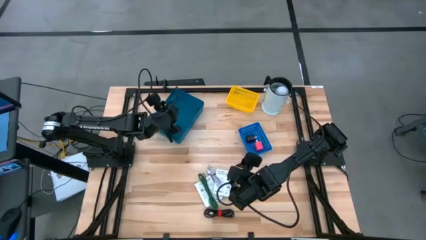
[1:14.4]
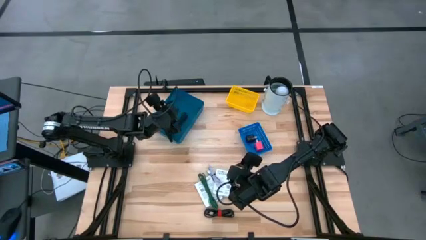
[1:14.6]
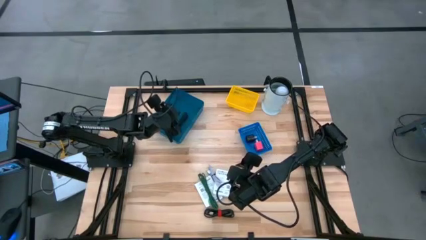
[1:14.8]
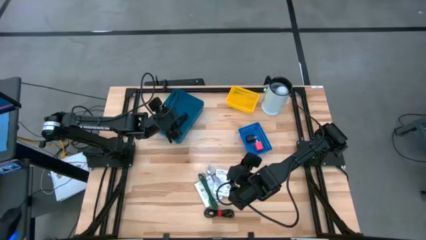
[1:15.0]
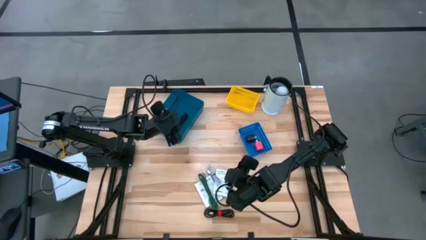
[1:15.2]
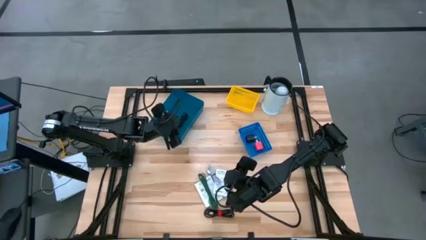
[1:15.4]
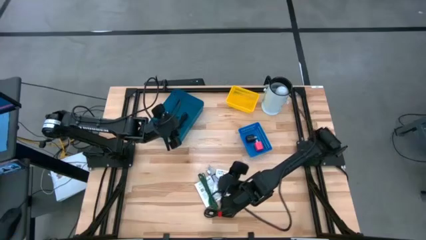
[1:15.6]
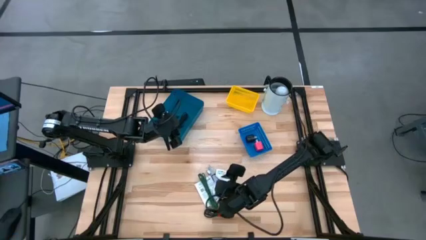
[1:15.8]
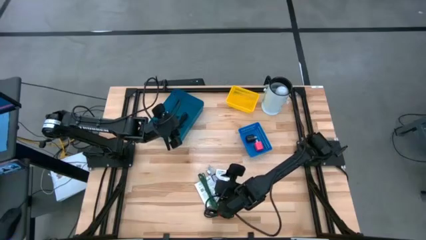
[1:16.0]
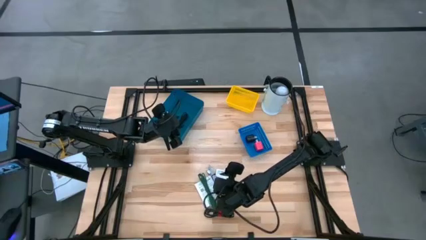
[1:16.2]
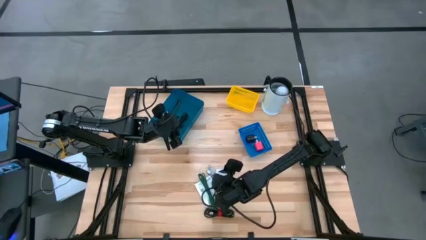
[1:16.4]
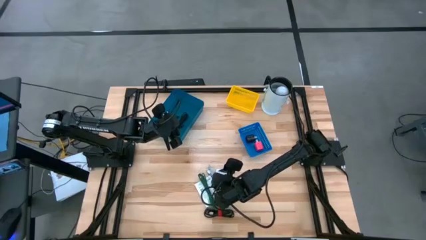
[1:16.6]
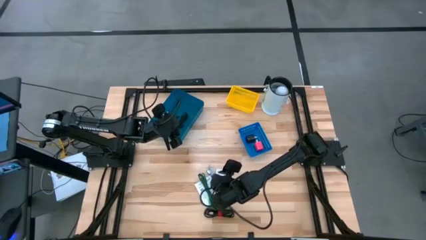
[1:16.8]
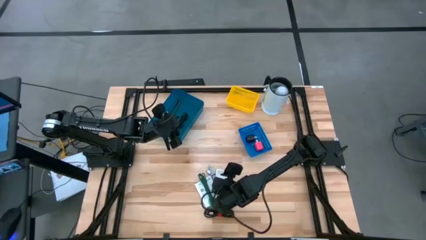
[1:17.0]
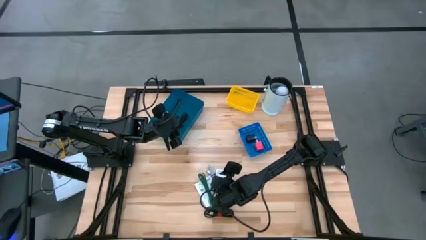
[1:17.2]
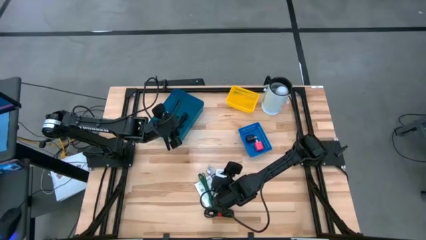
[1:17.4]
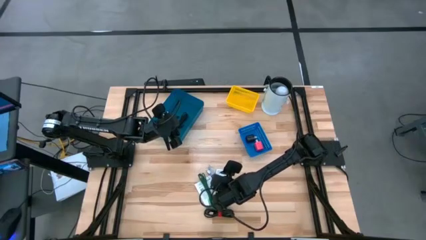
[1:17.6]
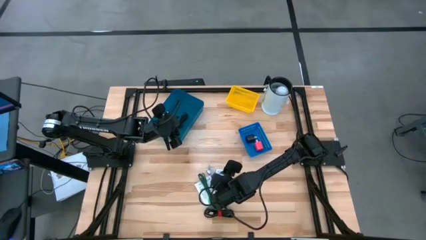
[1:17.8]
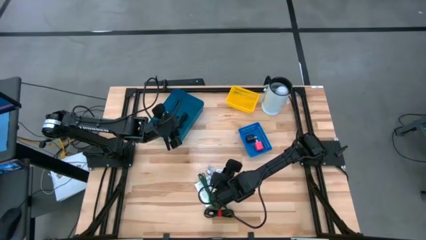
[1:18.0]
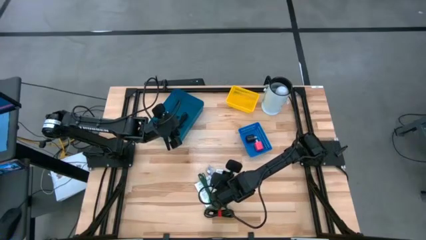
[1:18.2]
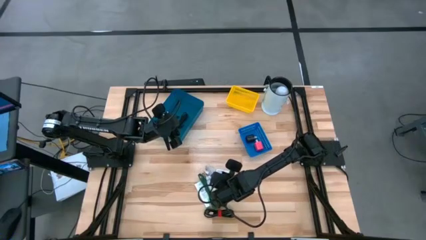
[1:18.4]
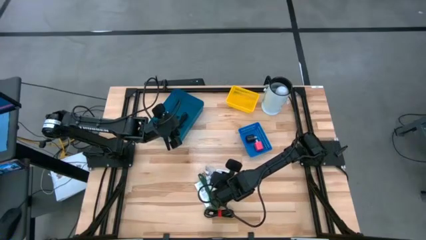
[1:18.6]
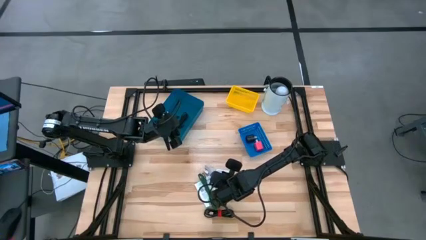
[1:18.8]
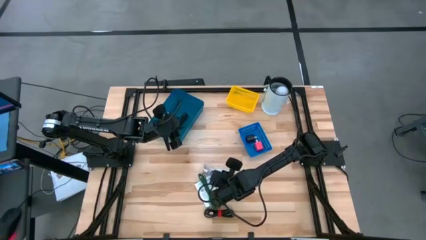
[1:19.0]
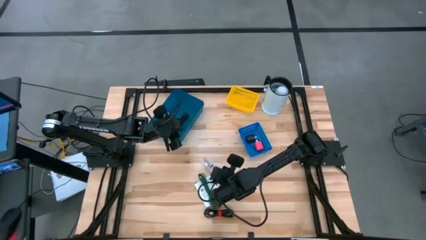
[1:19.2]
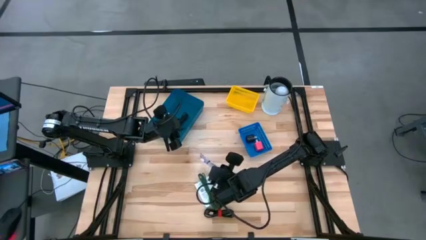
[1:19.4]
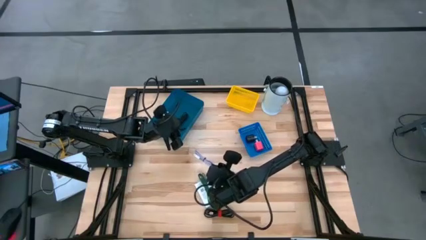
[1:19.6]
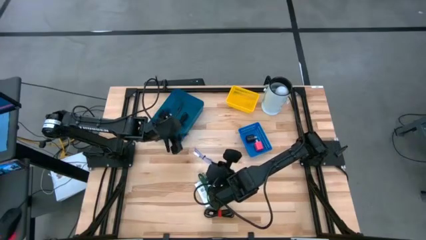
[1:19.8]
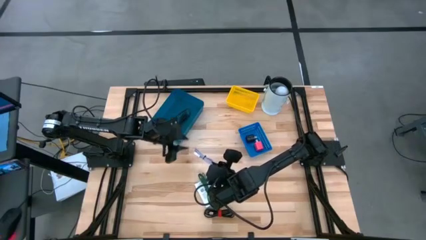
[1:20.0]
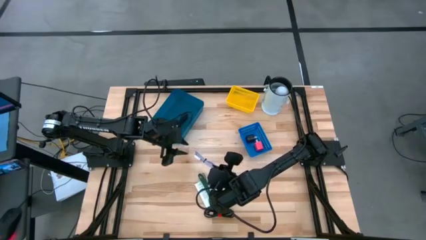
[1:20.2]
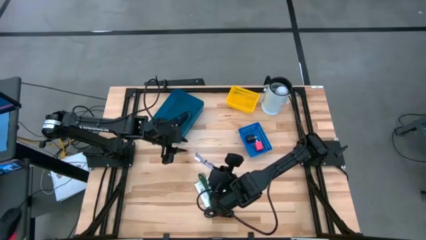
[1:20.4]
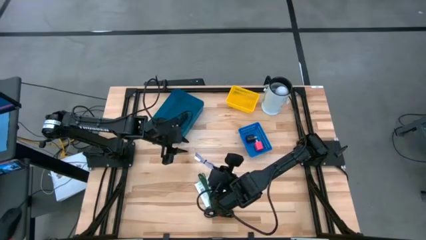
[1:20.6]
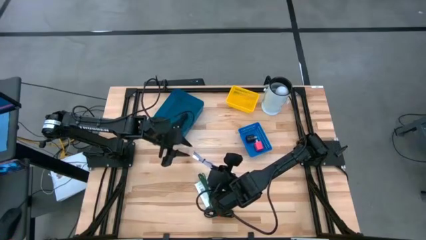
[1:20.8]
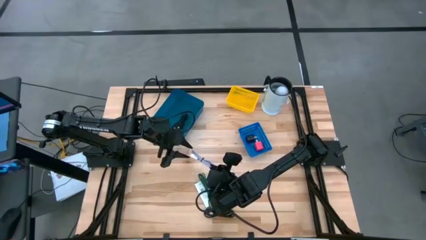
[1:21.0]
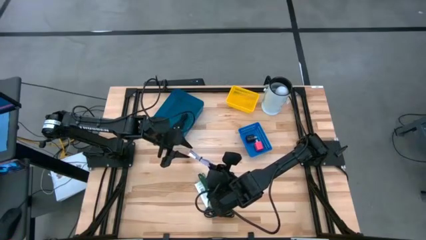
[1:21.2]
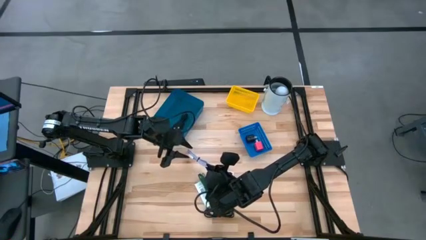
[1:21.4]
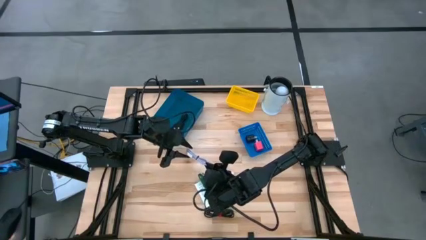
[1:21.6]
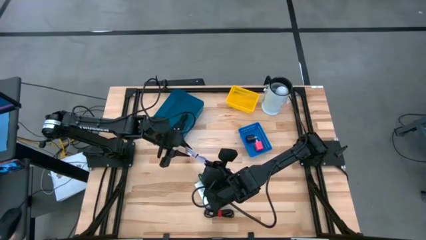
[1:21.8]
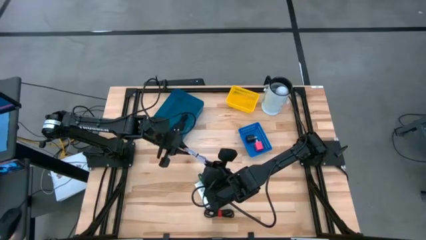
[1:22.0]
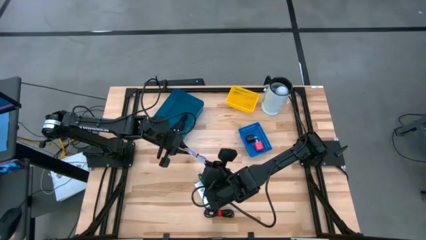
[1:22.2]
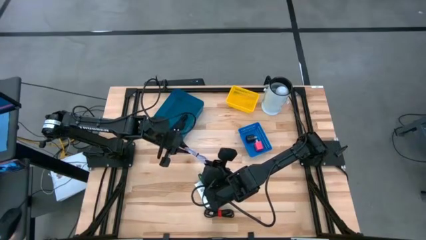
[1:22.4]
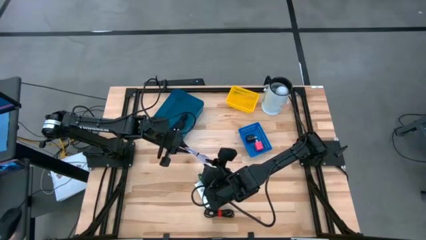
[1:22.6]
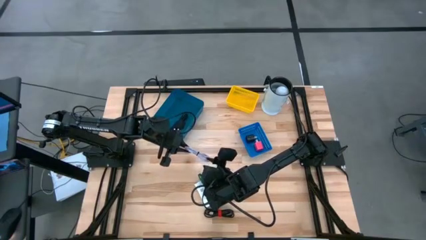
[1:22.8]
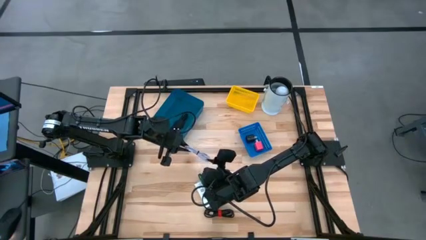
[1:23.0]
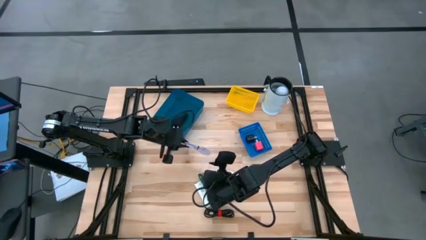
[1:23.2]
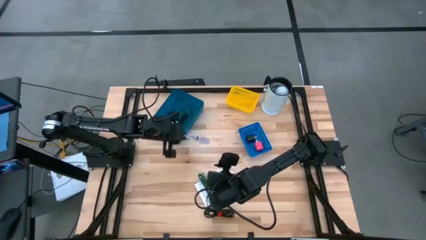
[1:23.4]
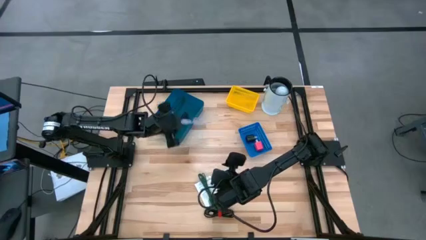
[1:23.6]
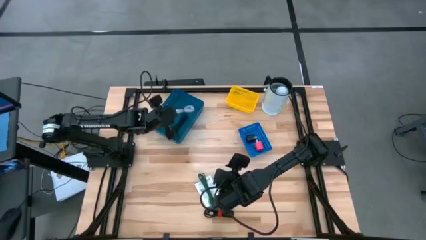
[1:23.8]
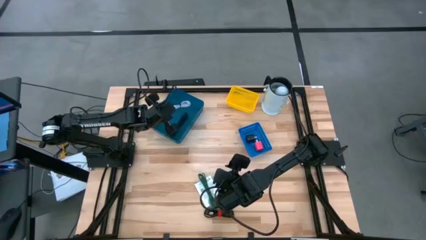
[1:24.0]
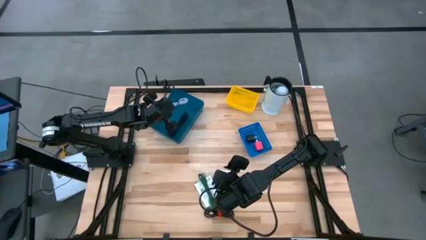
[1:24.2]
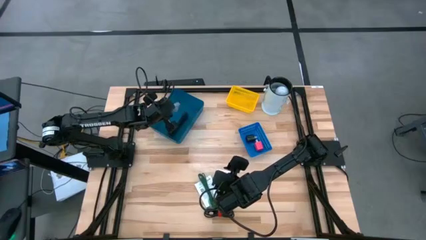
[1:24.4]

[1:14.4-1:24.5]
Task: Pick and place items into bin
Put the purple charger cable into the dark blue bin

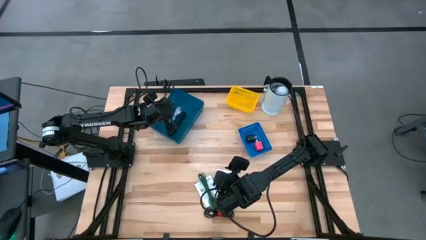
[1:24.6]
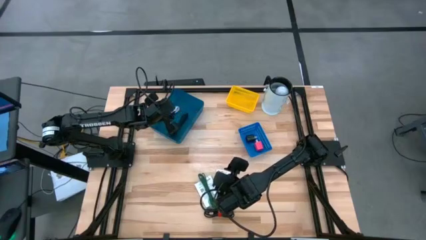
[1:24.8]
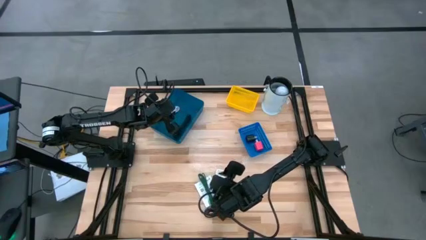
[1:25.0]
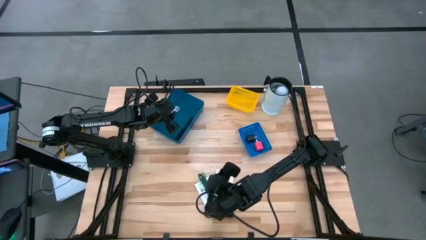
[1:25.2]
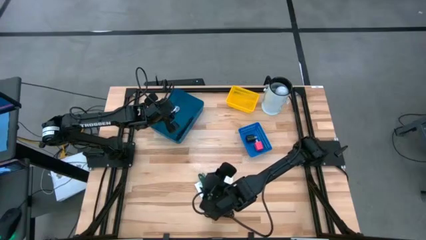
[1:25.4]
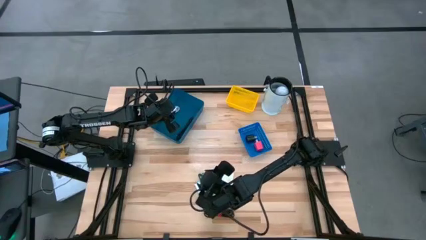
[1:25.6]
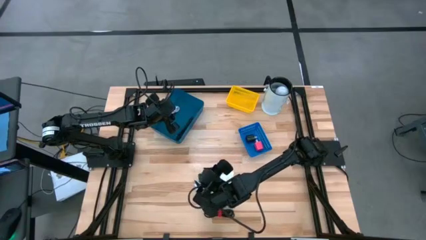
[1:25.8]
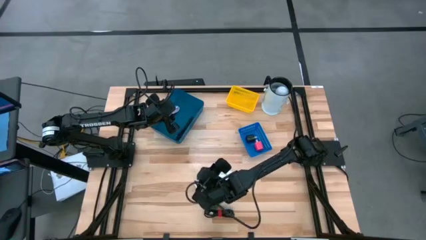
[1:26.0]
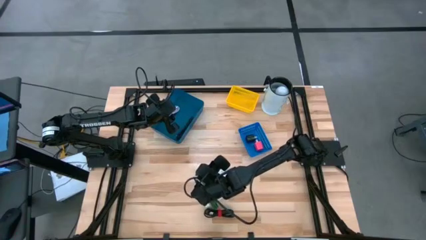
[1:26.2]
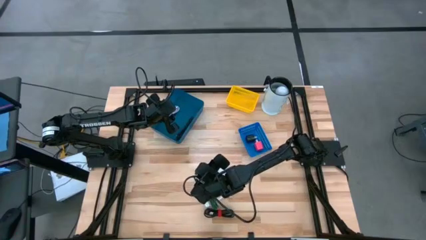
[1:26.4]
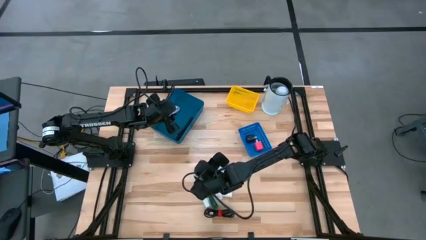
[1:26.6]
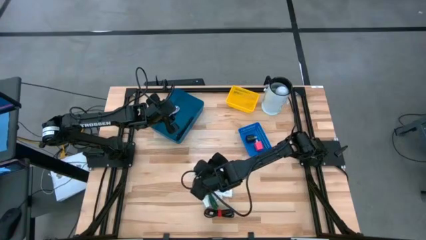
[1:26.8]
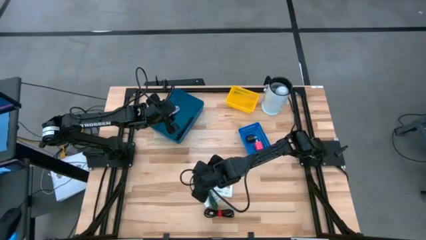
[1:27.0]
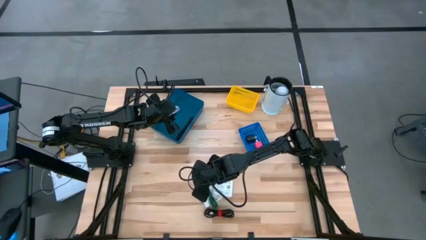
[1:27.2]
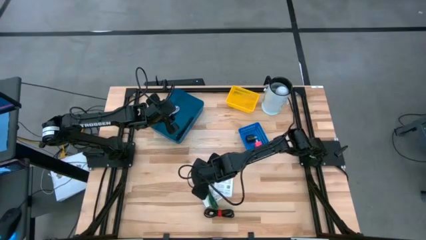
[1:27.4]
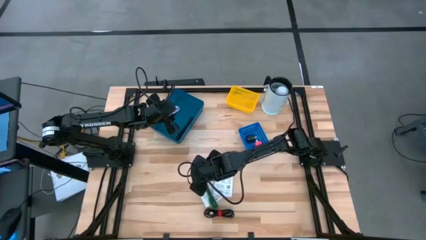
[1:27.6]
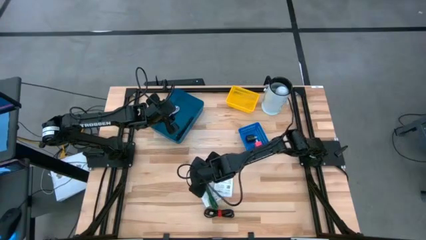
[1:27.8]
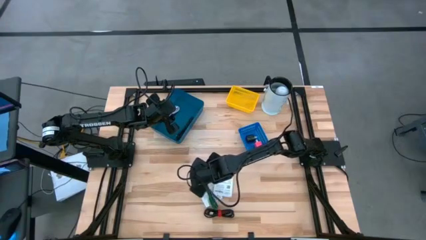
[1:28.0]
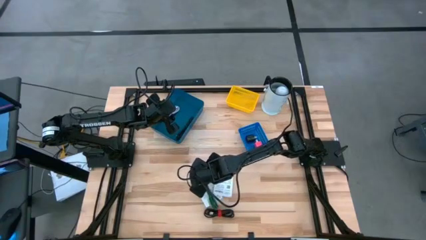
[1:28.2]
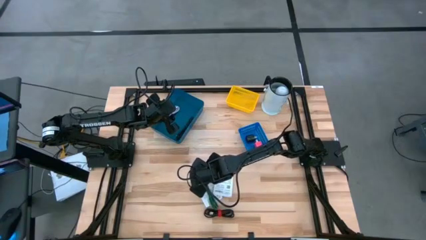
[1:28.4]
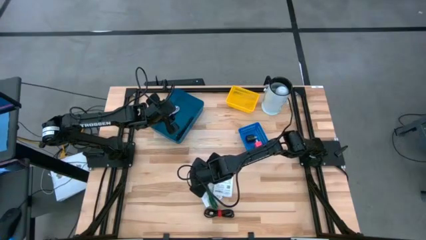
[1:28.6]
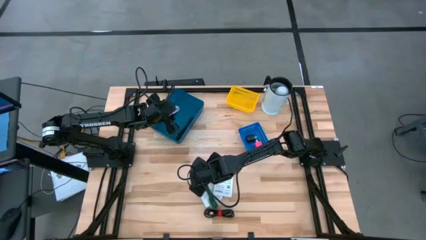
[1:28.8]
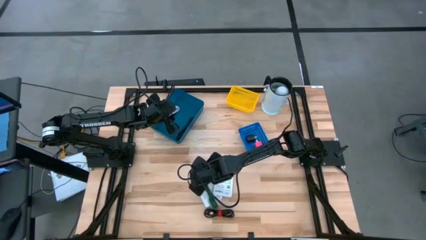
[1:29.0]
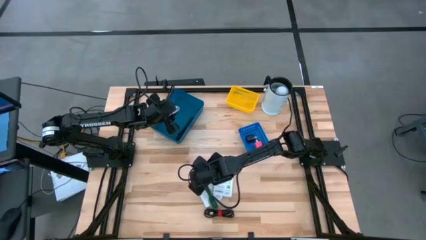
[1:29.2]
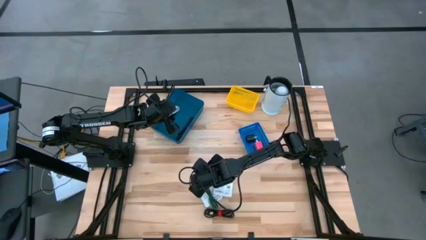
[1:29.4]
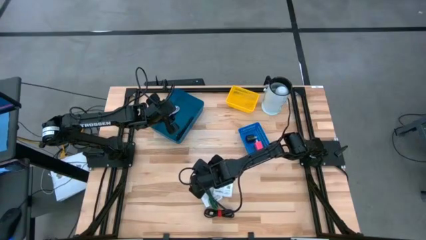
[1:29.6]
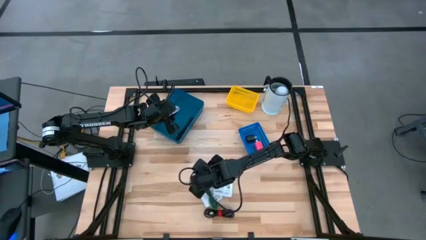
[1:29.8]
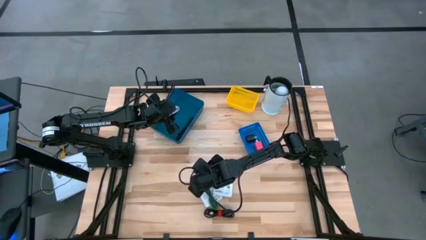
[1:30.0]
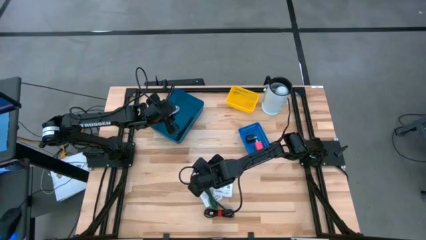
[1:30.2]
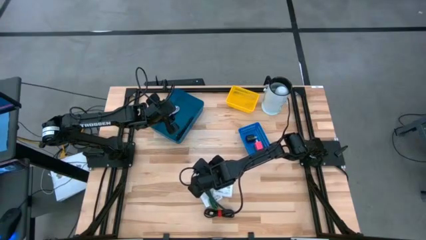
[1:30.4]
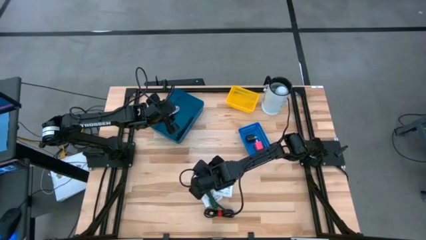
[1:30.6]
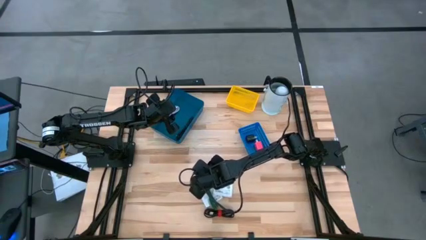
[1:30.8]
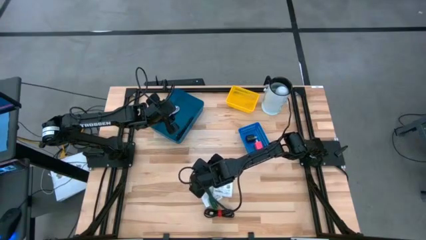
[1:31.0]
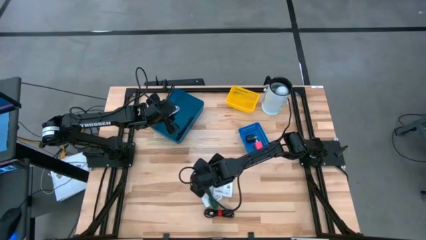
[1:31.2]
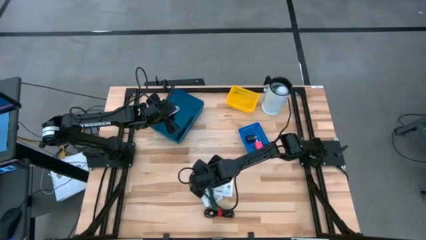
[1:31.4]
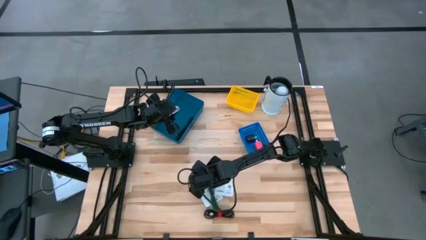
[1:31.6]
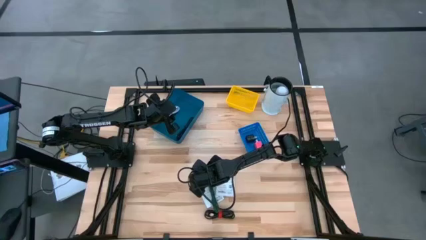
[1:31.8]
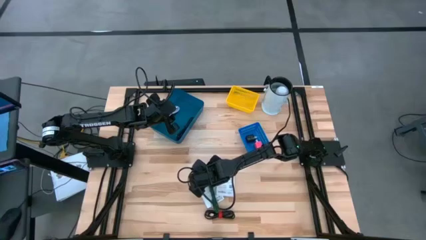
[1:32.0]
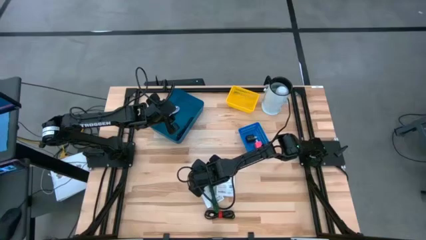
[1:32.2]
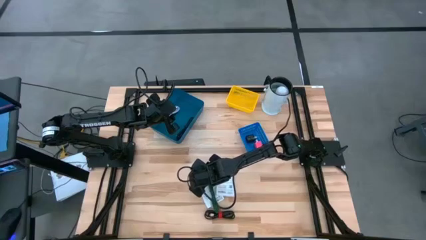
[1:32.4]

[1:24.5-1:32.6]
Put the green charger cable into the dark blue bin
